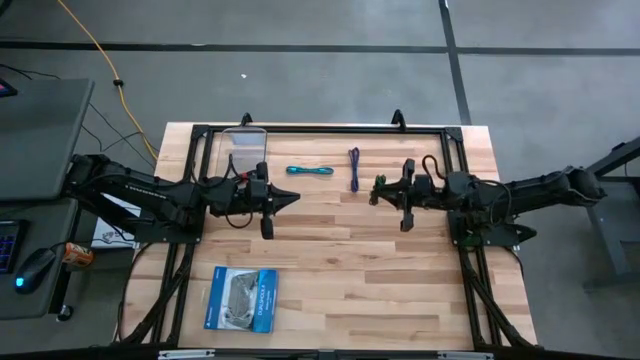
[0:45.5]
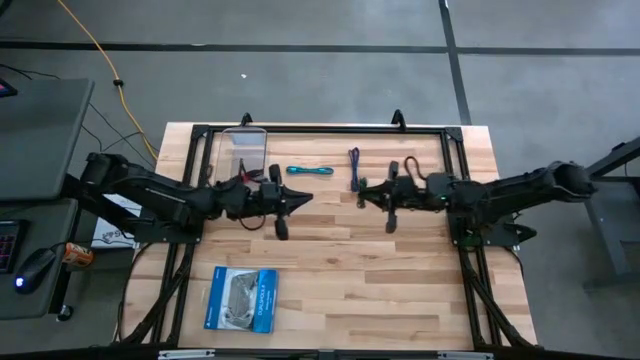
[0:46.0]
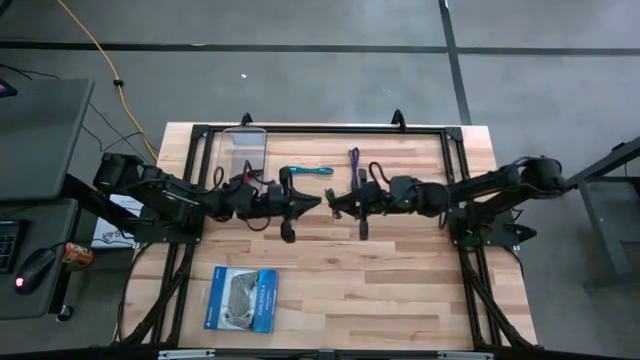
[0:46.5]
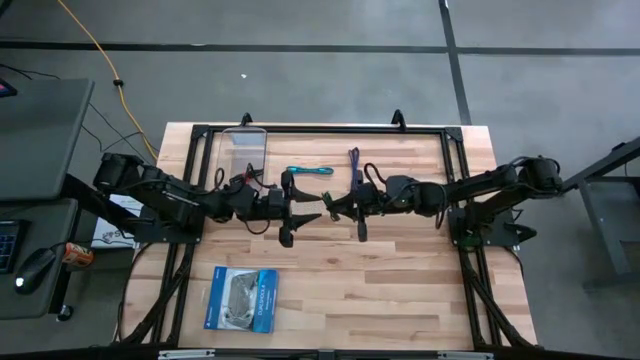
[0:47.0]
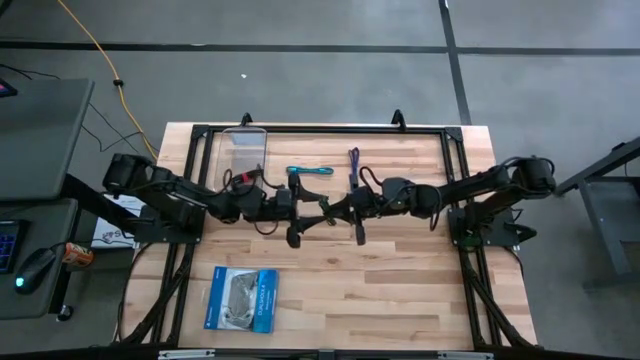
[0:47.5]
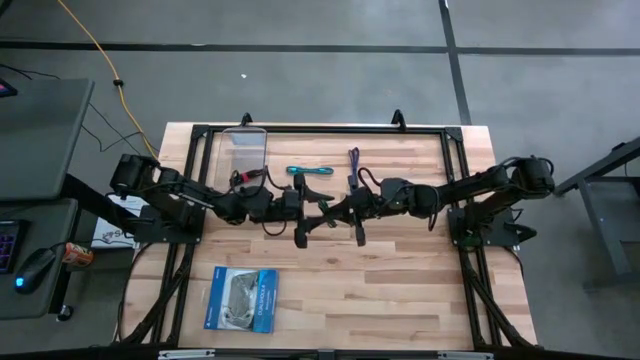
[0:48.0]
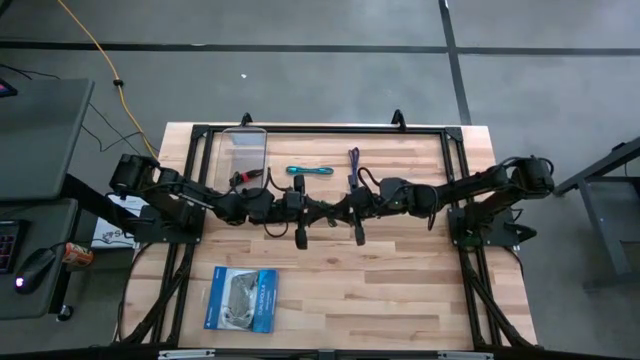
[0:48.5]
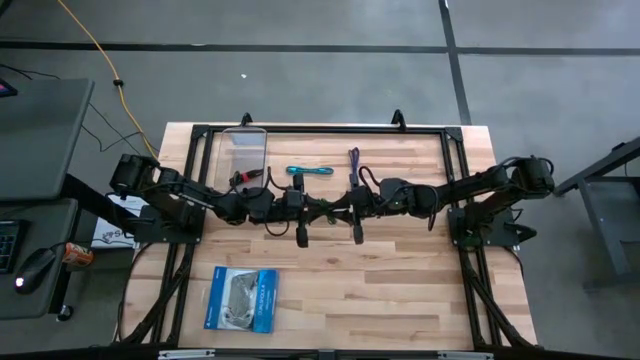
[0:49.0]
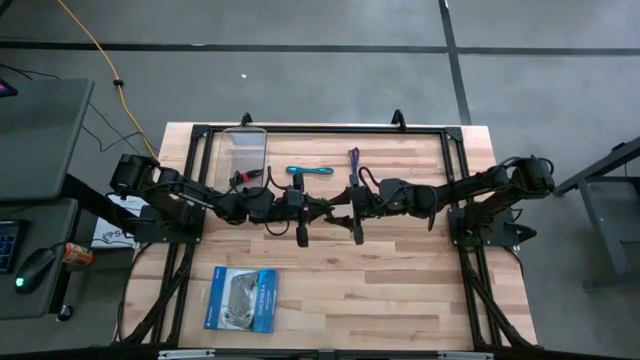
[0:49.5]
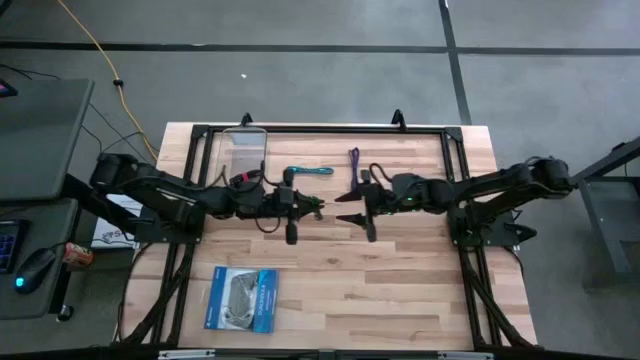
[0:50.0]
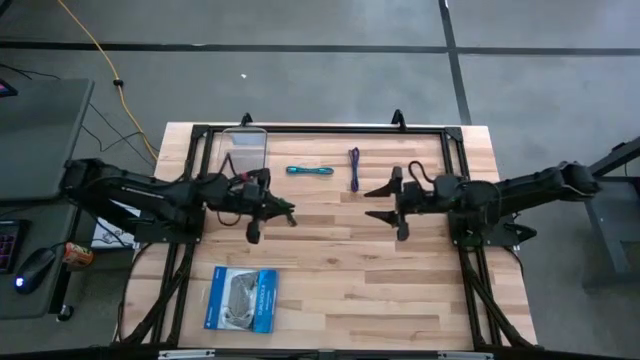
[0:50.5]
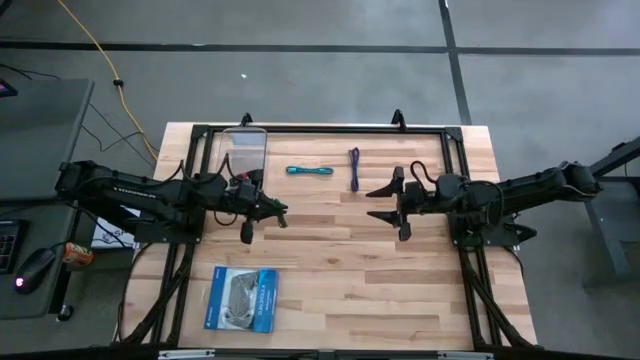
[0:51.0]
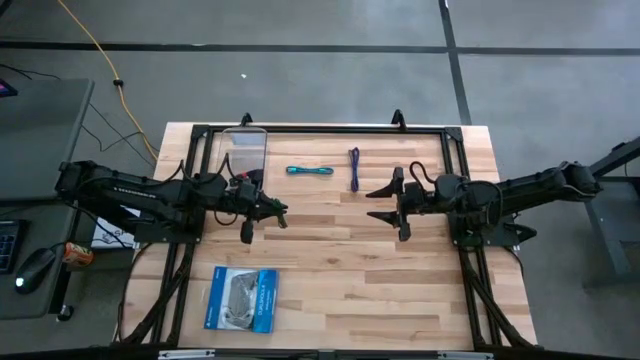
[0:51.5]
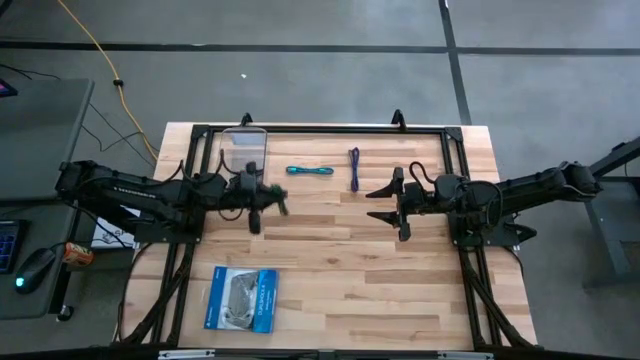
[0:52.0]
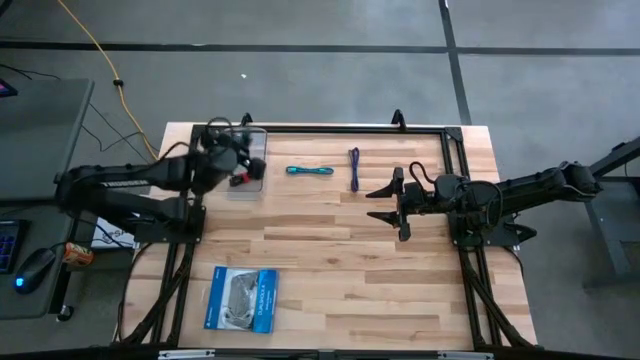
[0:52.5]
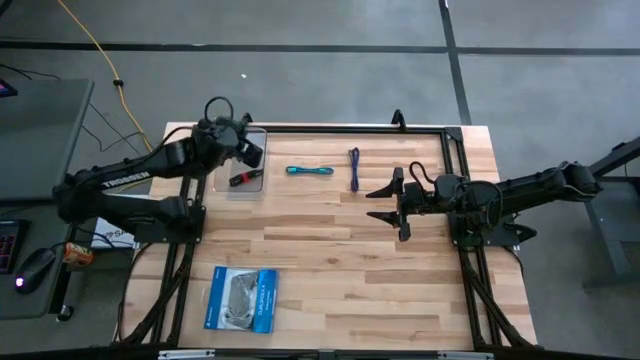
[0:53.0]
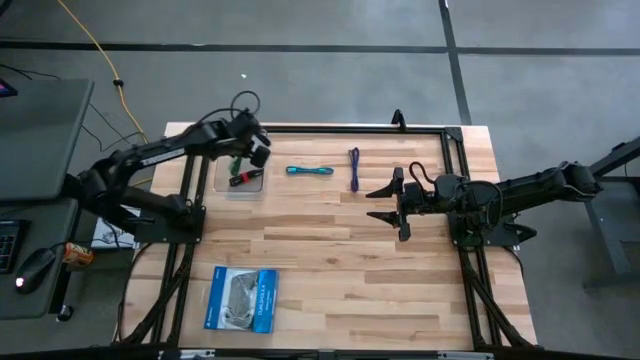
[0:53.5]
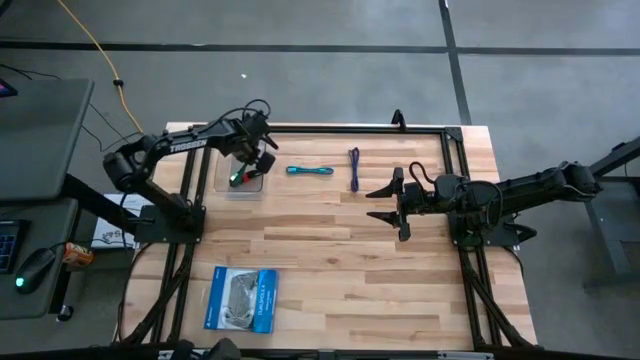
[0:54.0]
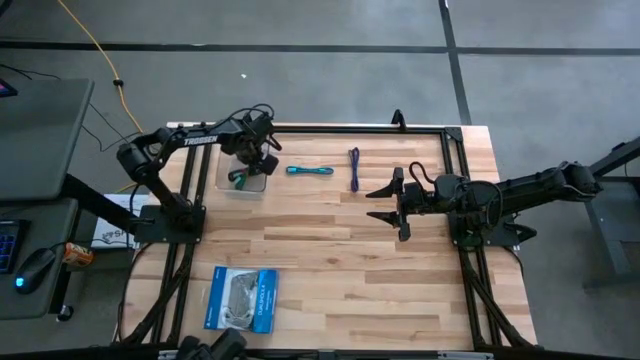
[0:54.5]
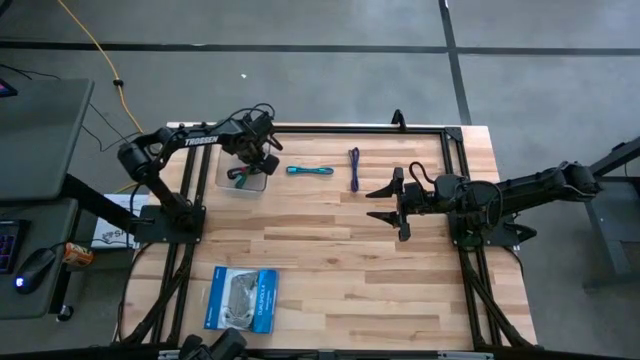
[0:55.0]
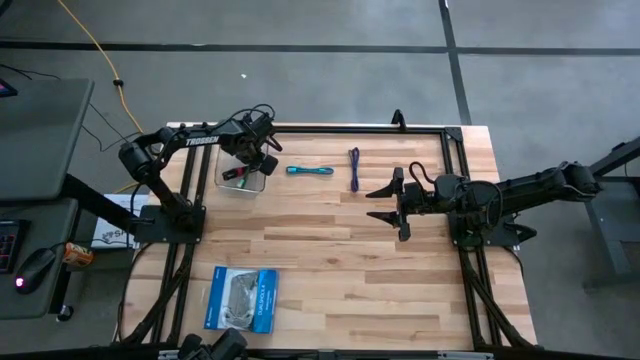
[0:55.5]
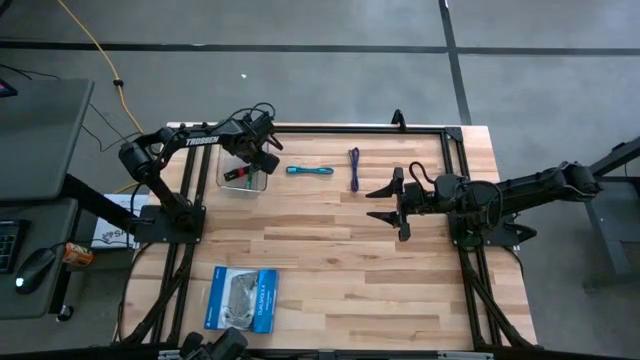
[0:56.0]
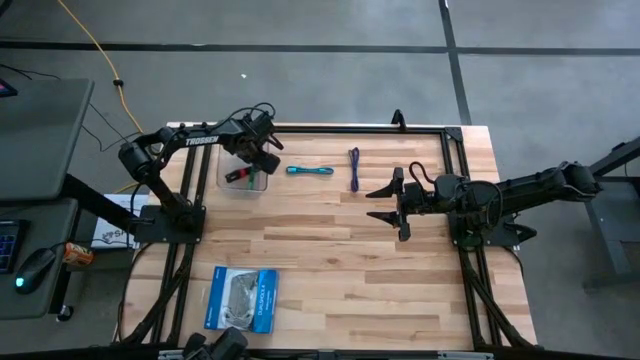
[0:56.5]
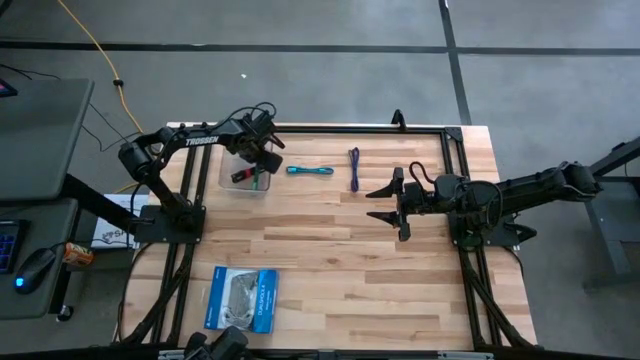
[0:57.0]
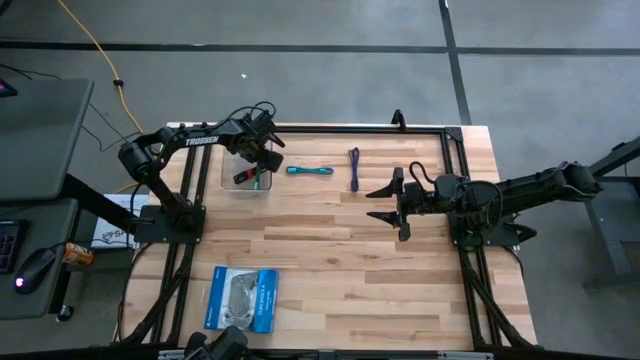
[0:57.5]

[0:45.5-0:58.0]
Task: Pick and place USB-C Cables
Put the green USB cable into the transparent bin

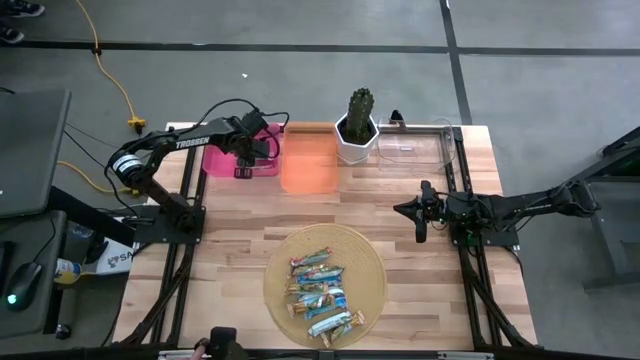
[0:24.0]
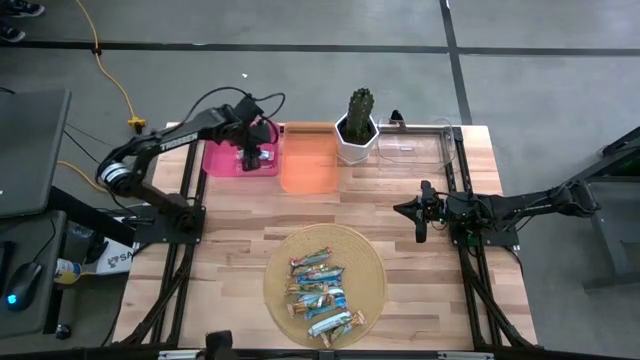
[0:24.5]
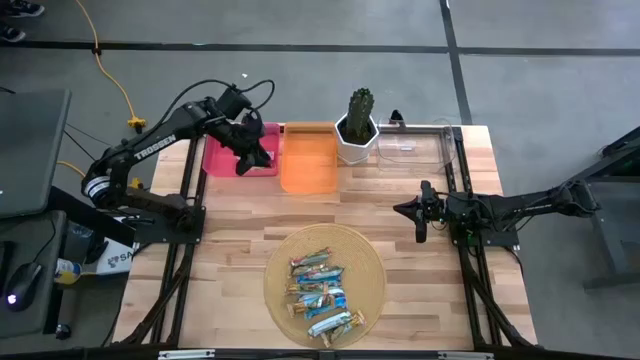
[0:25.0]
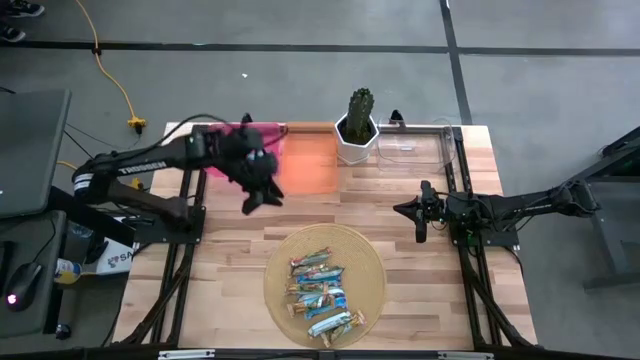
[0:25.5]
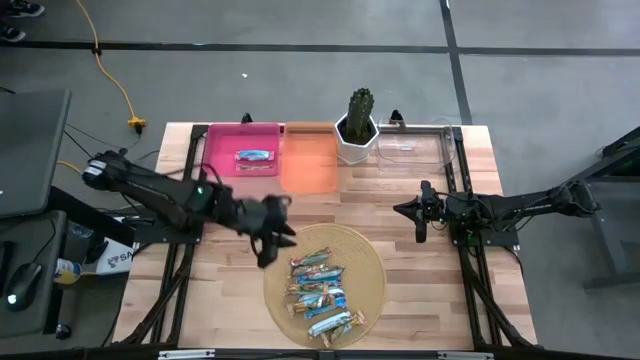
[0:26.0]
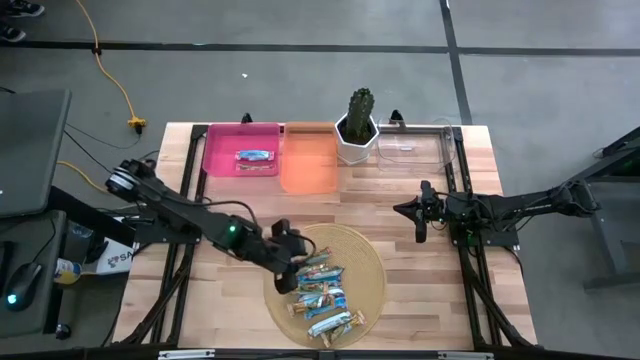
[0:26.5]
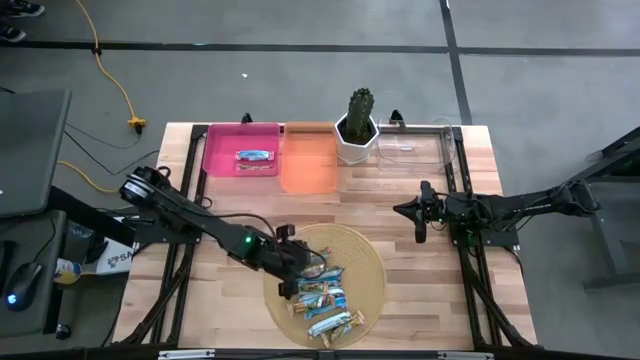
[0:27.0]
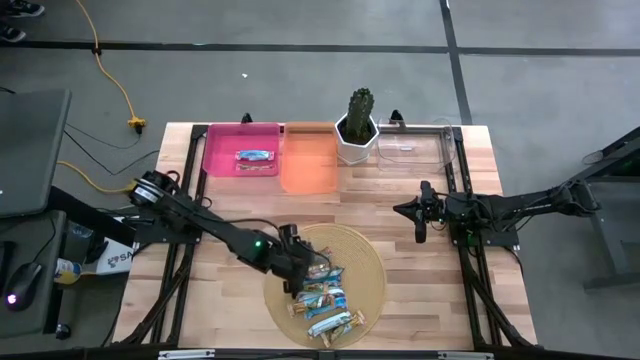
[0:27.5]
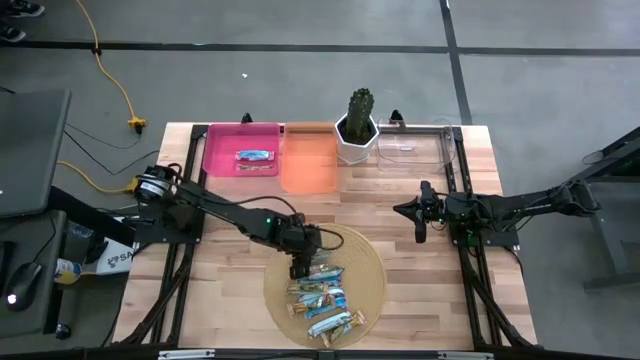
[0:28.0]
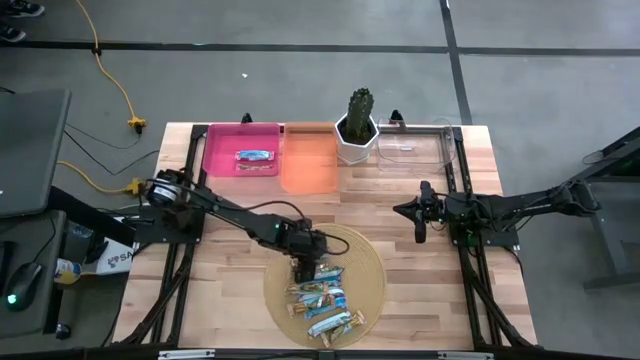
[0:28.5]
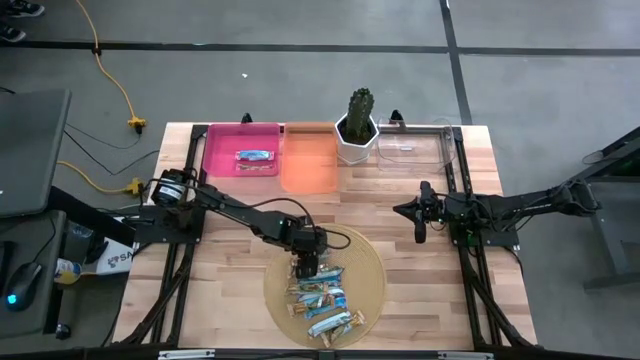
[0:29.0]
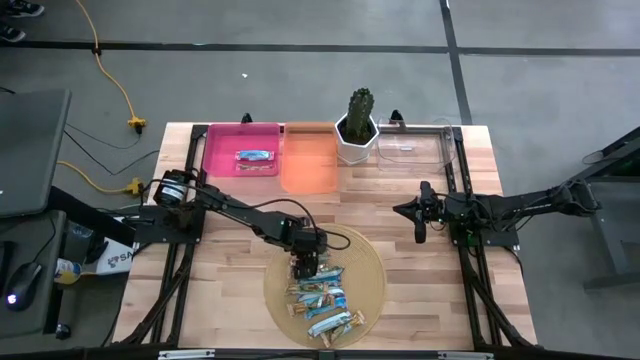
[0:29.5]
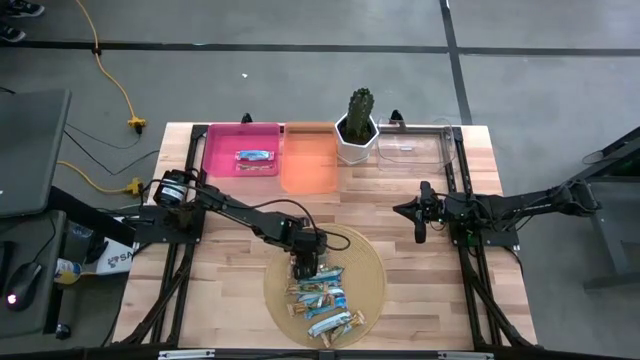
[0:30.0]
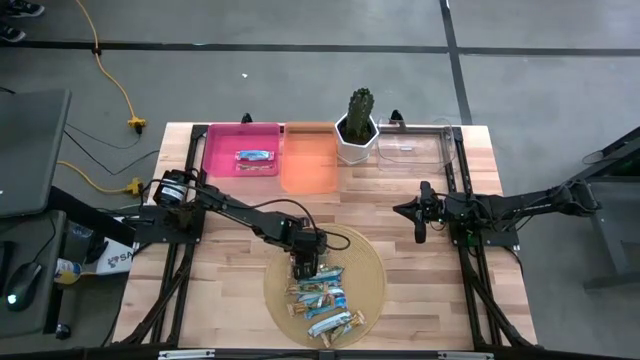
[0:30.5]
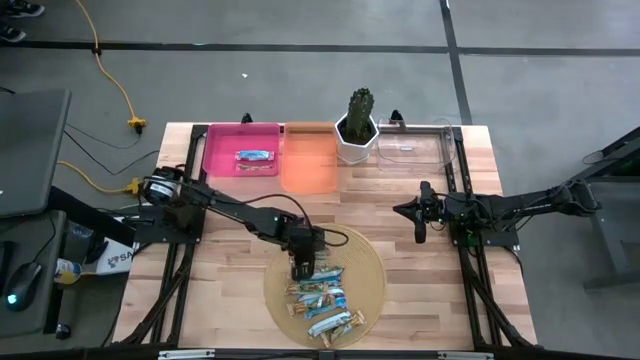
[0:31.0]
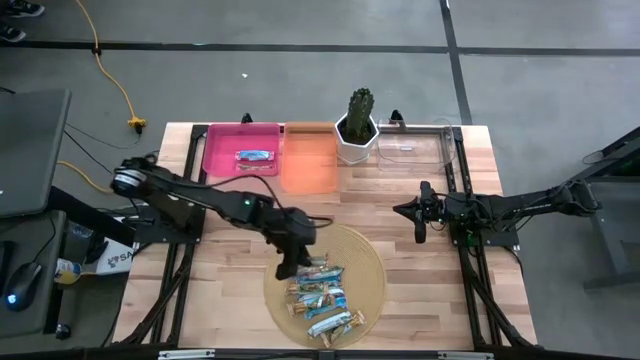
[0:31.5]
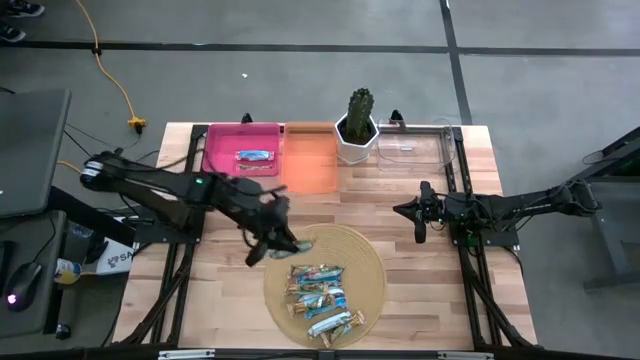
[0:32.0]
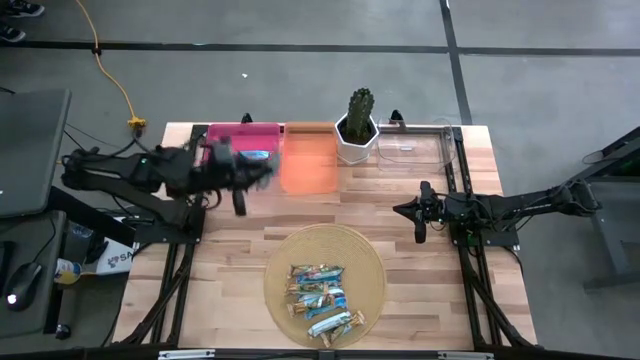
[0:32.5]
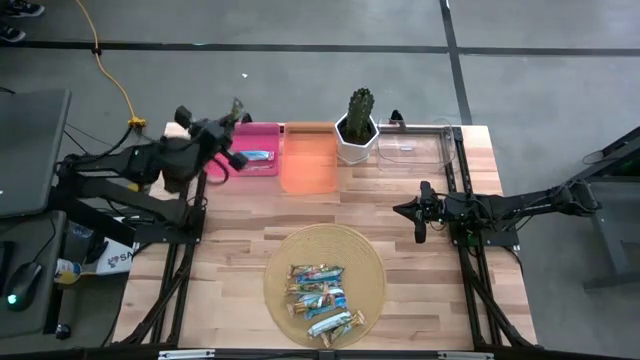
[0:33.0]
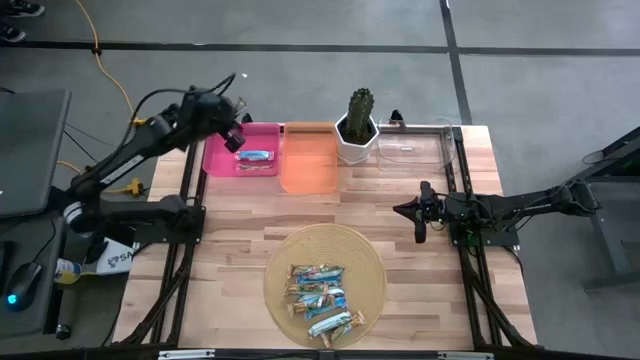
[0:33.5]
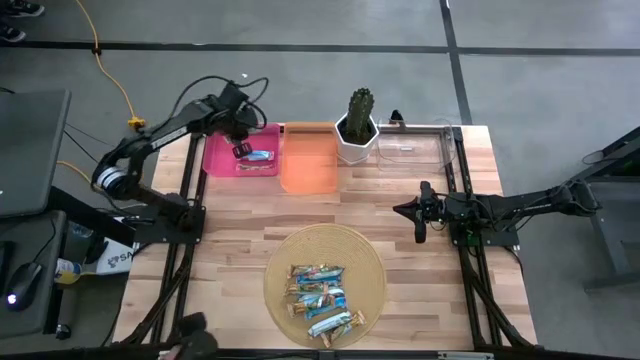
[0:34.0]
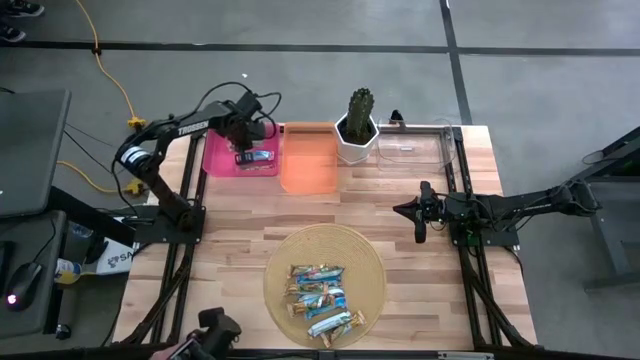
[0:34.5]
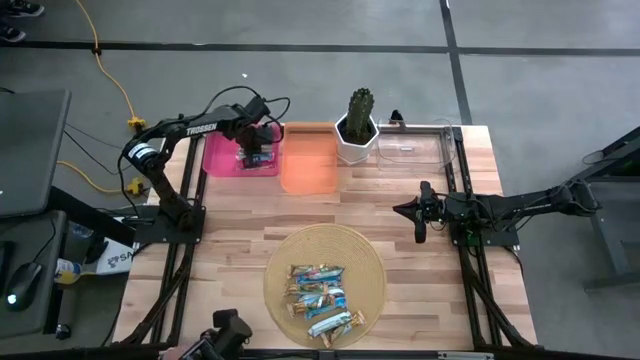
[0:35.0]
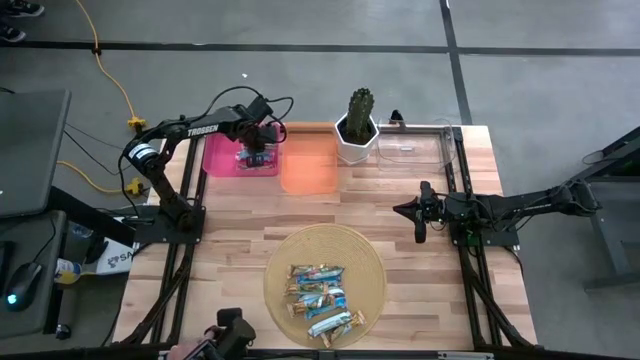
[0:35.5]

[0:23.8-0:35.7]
Task: Pick and place Granola Bars by type
Put the red granola bar into the pink bin
